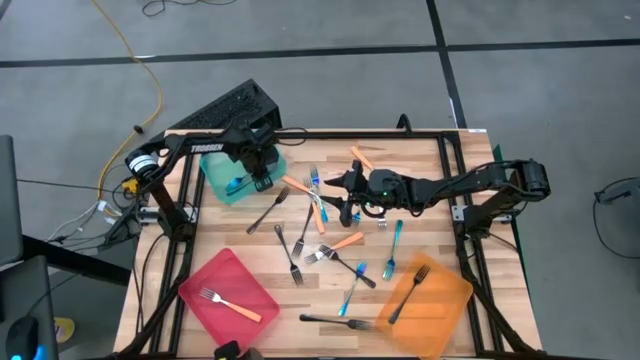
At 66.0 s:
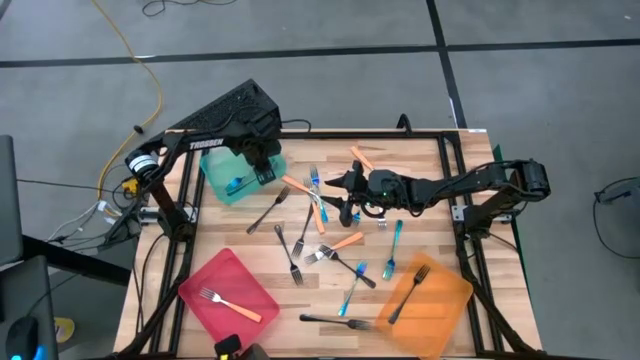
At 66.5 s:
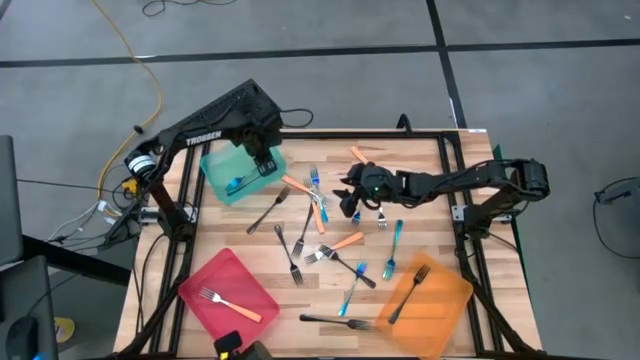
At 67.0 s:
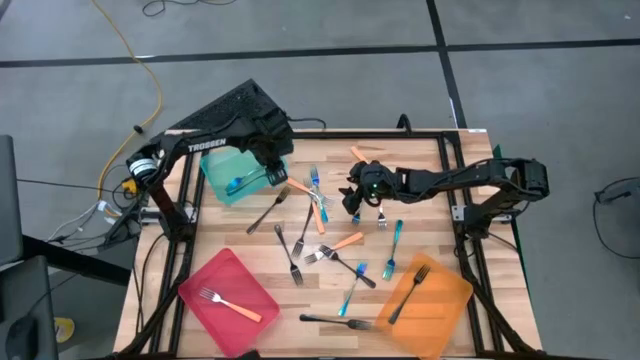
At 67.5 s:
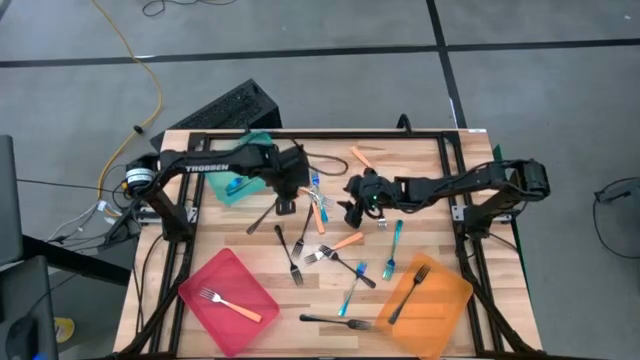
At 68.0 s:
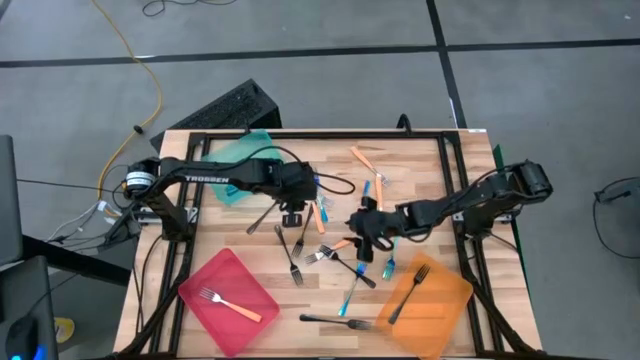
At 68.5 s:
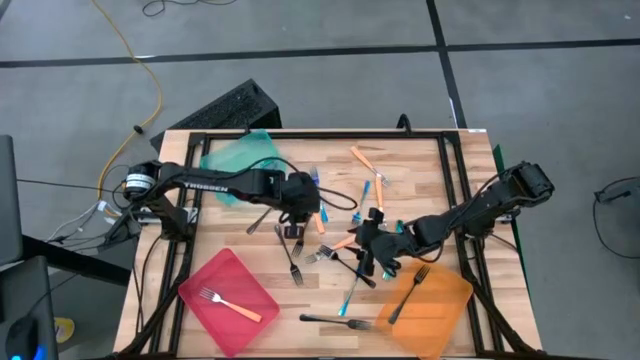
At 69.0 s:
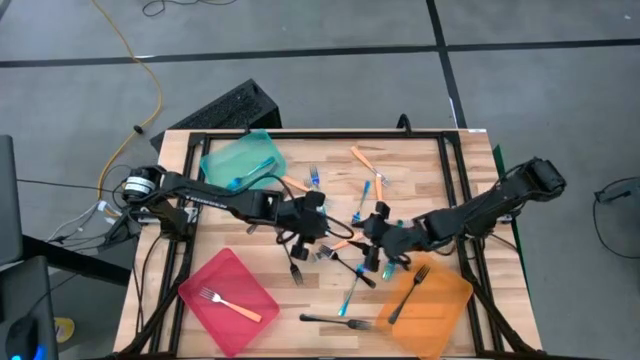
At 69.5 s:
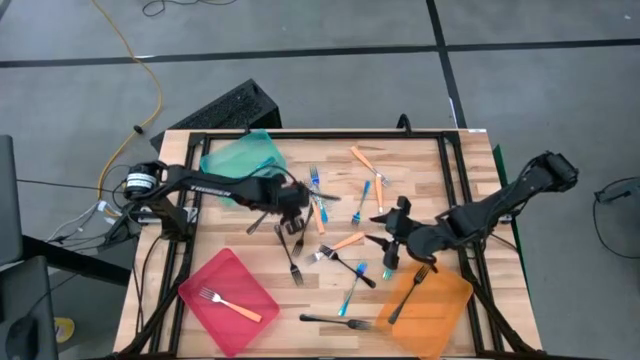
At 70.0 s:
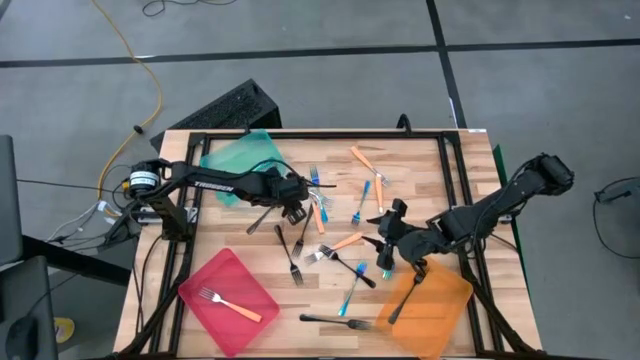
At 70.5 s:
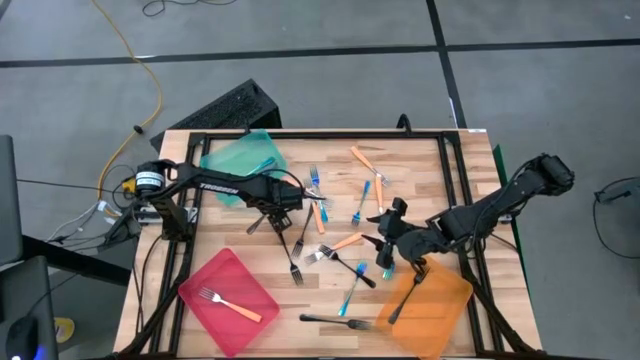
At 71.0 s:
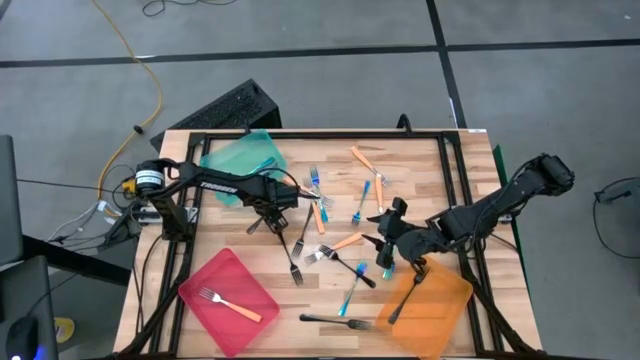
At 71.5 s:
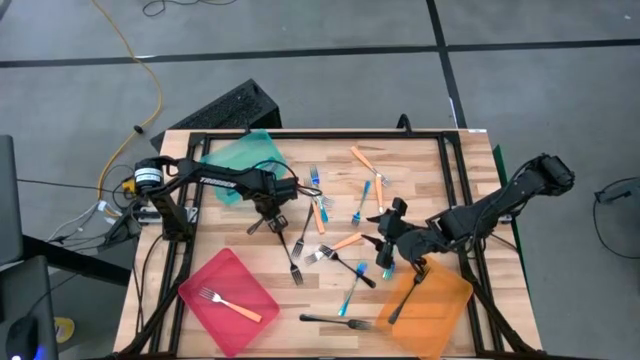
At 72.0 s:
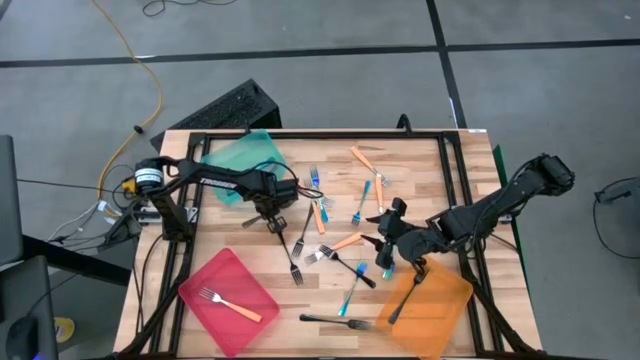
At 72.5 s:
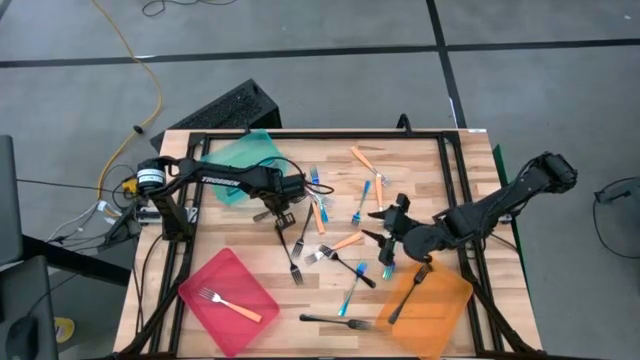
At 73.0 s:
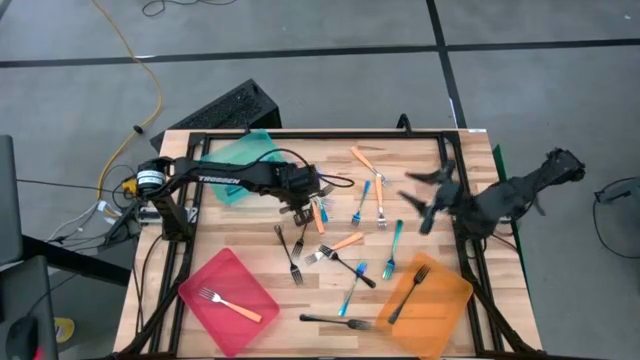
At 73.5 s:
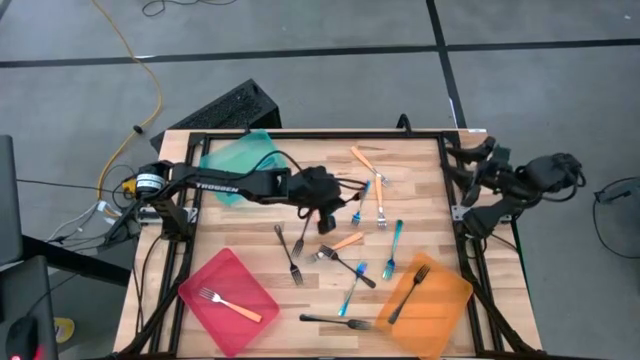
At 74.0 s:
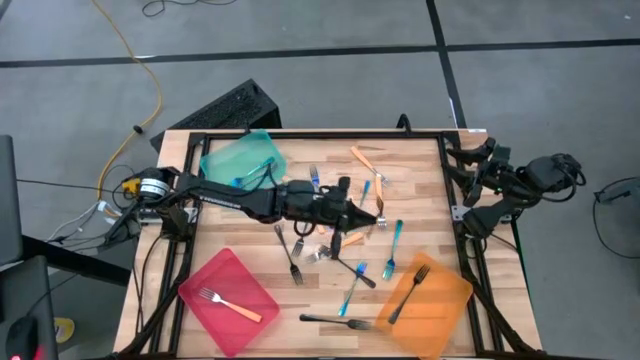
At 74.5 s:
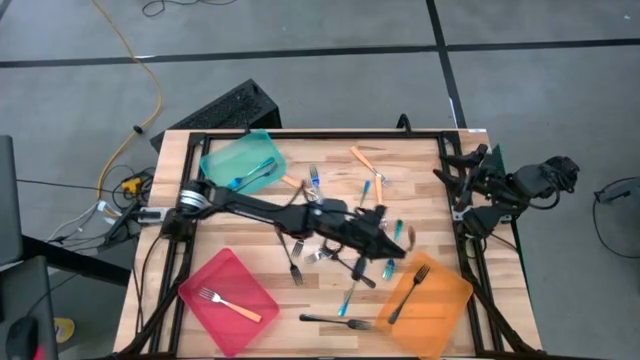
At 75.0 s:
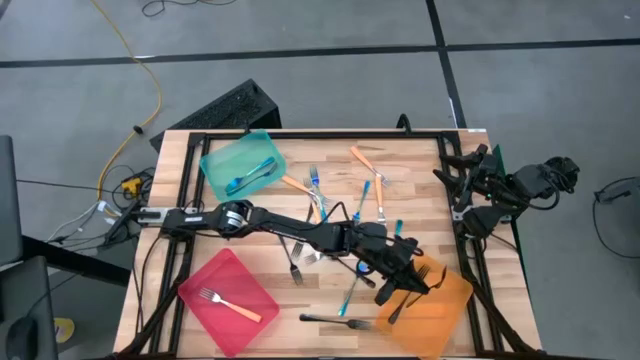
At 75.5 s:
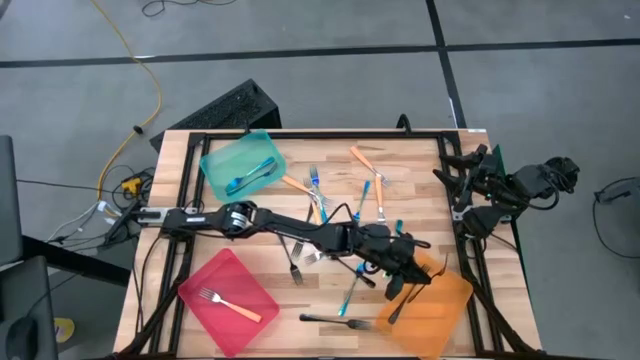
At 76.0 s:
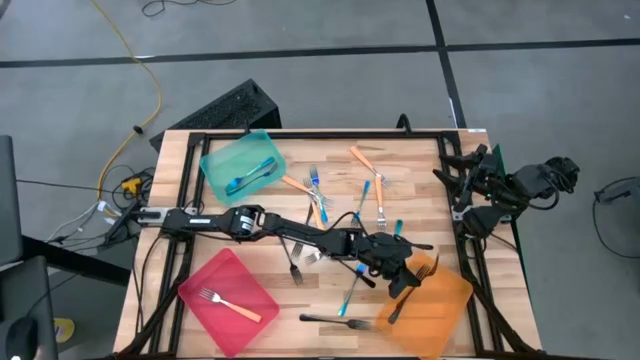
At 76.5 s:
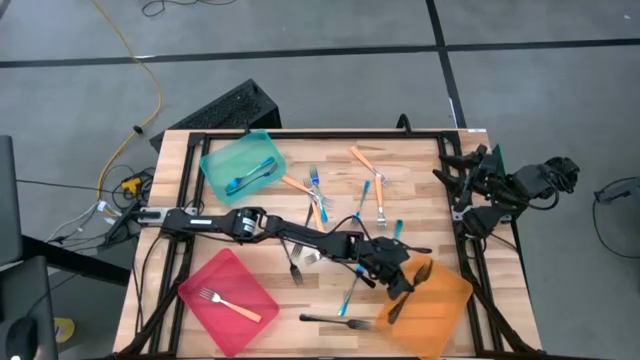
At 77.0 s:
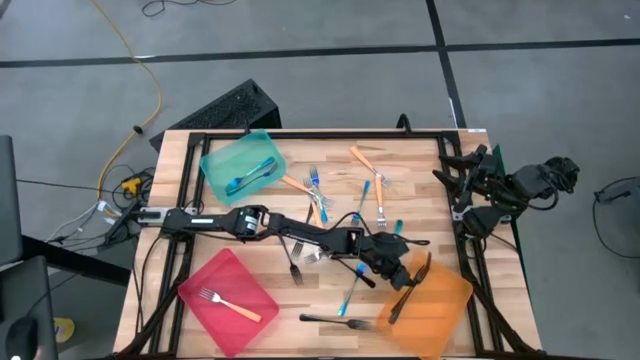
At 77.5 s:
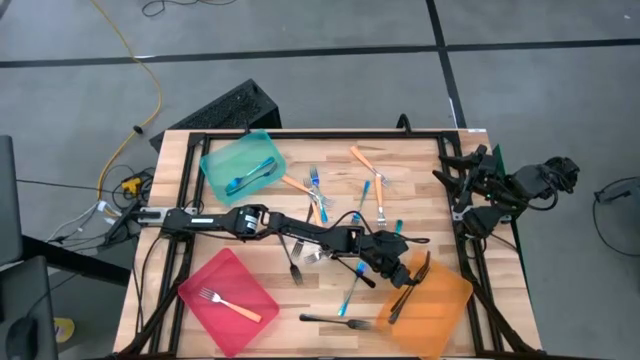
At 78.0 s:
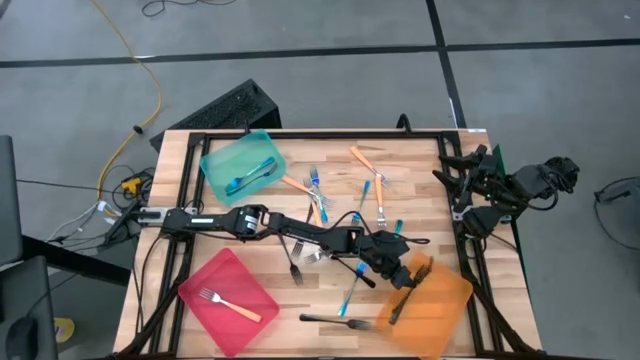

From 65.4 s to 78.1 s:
Task: Sort silverware by color (type)
Put the black fork into the orange bin

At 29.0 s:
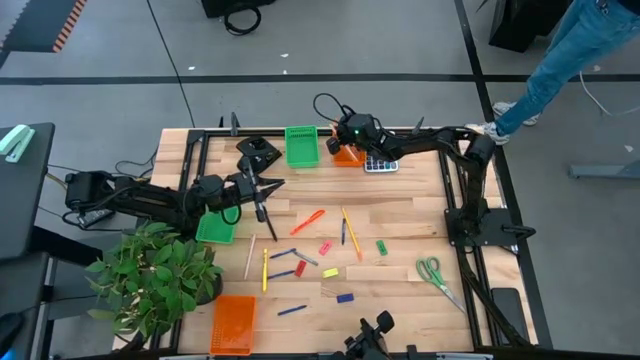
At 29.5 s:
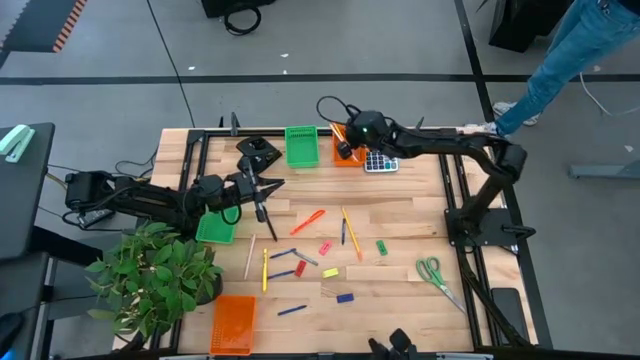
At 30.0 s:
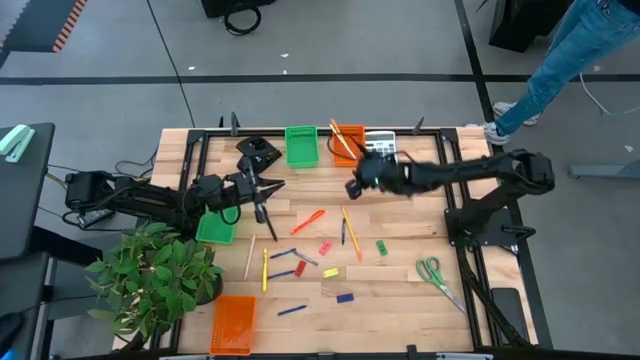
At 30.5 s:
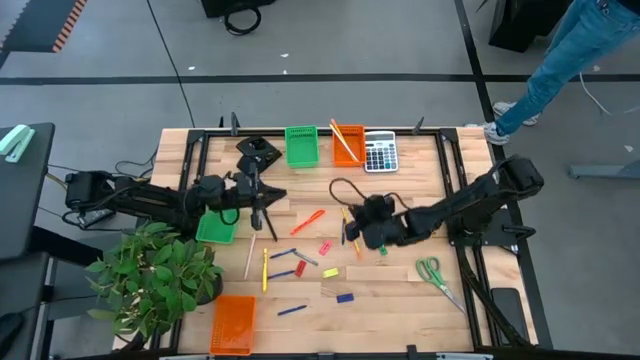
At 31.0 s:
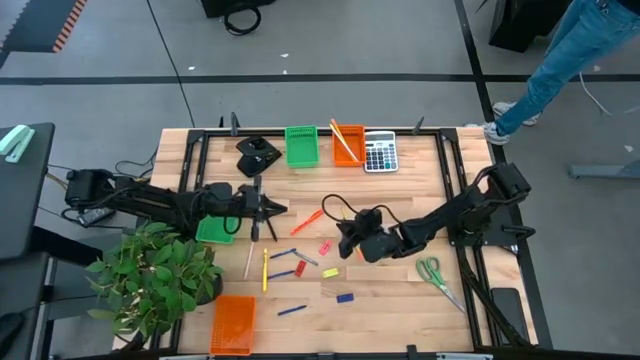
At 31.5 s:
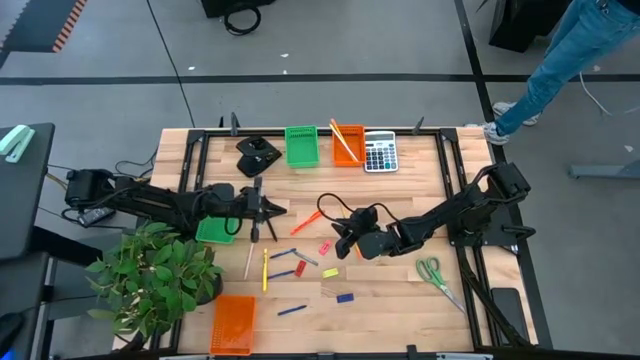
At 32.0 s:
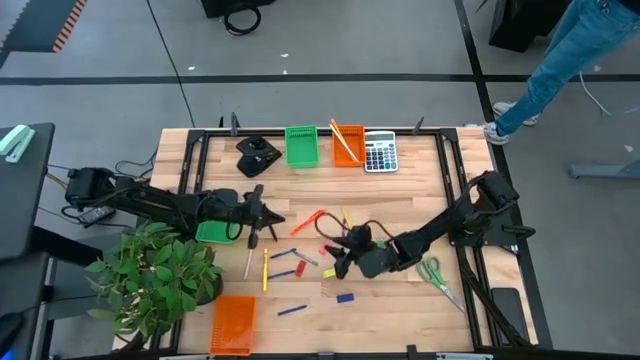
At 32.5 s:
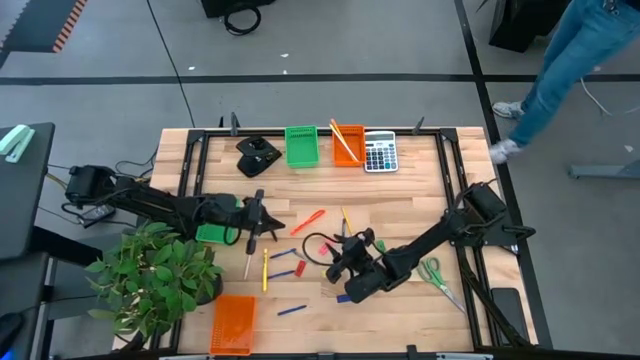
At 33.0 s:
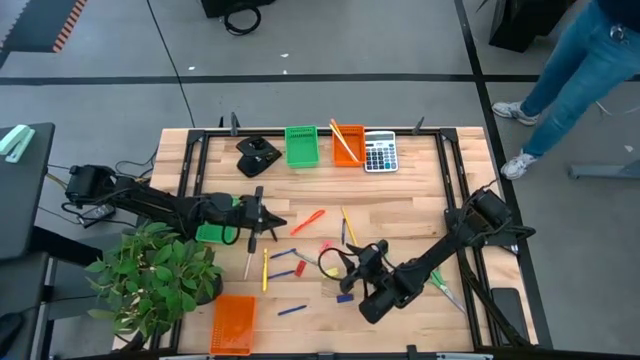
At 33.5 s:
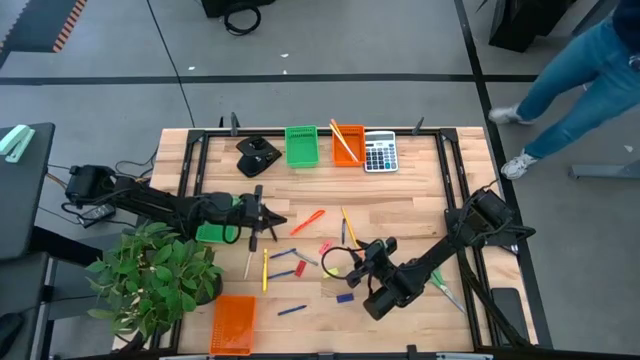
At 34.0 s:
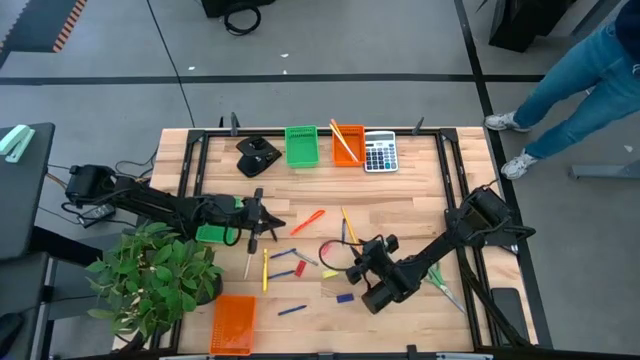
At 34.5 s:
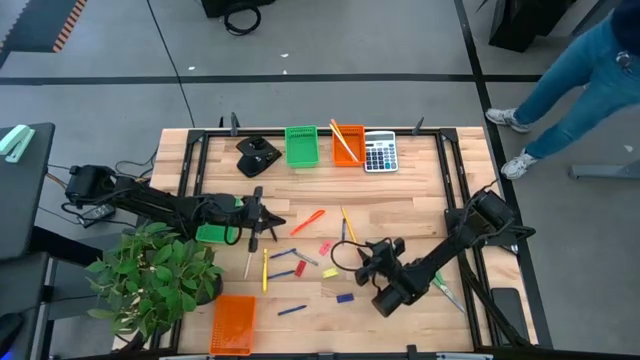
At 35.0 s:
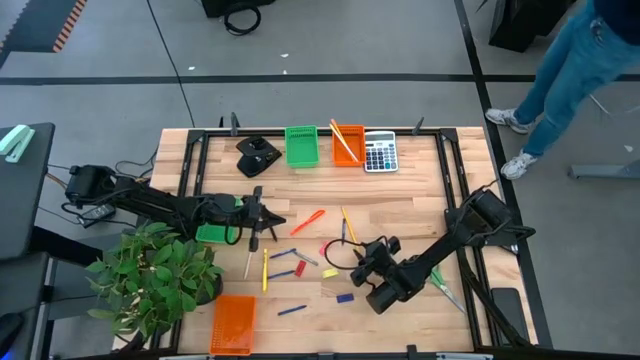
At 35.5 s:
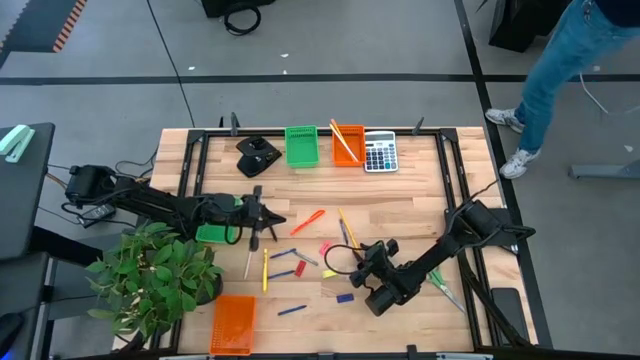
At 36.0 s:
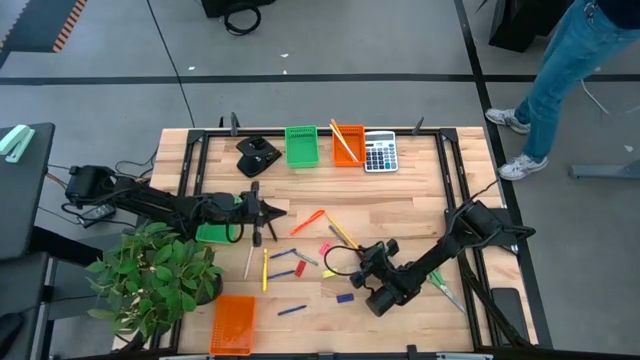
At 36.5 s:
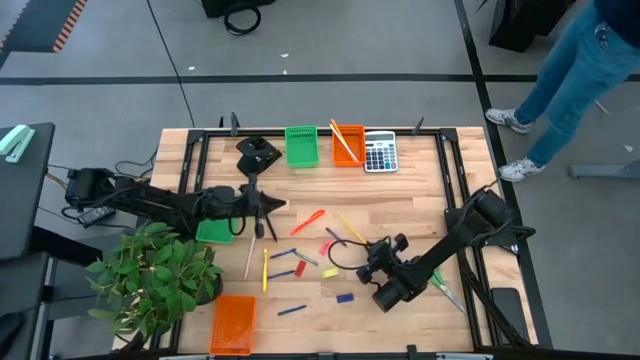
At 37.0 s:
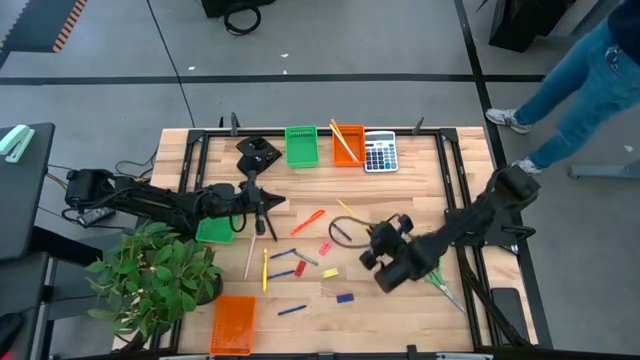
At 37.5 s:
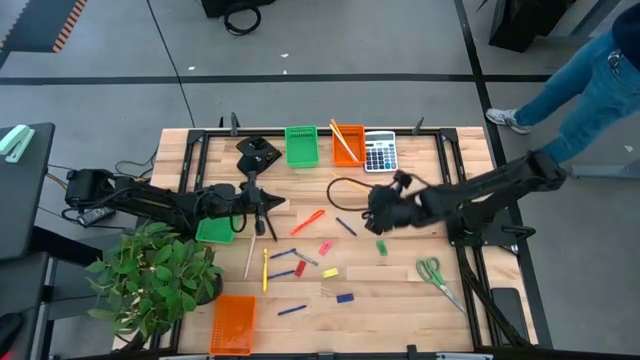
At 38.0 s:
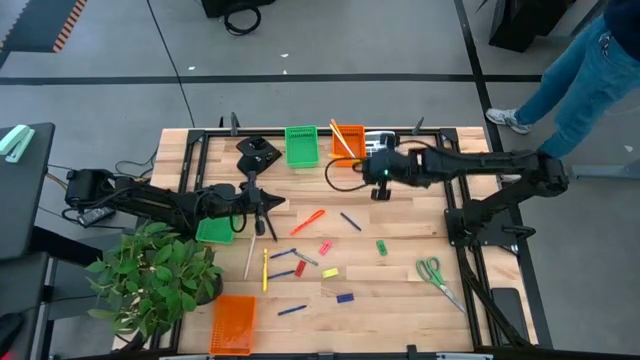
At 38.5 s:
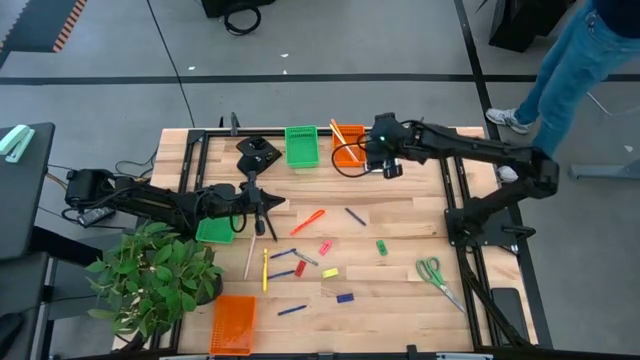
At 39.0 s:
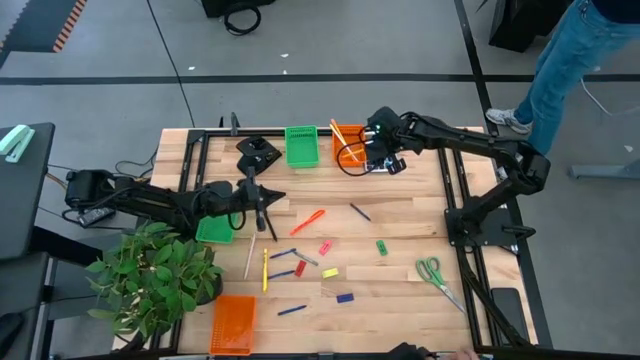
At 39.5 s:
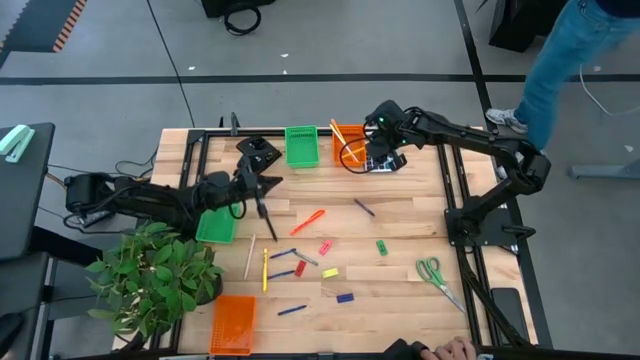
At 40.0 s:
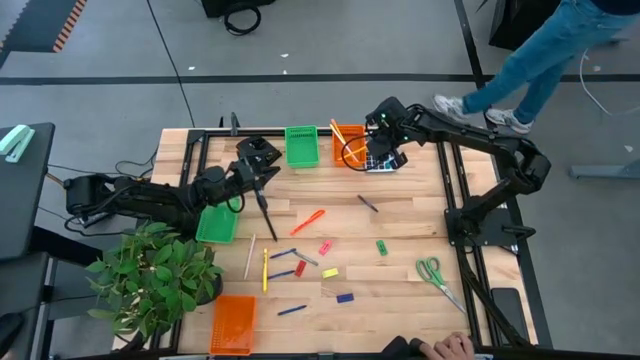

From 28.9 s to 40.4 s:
Task: Sort crayons/erasers/pens/pencils in bins
Put the yellow pencil into the top orange bin
